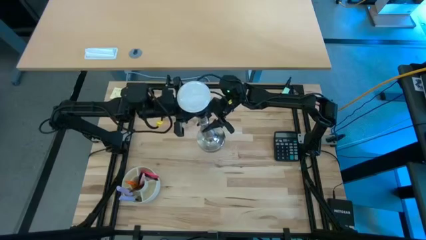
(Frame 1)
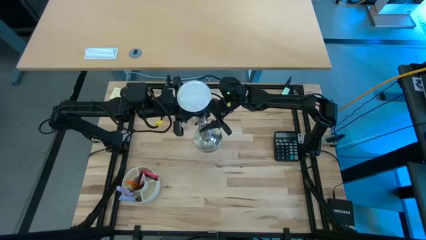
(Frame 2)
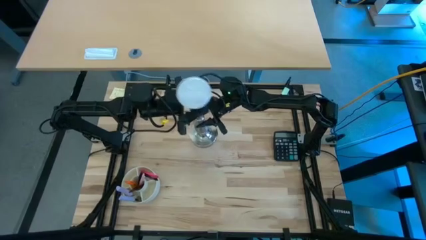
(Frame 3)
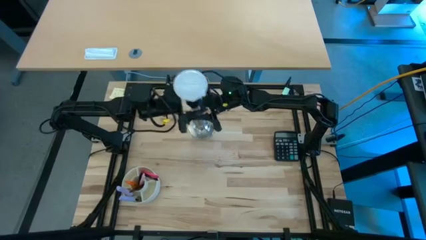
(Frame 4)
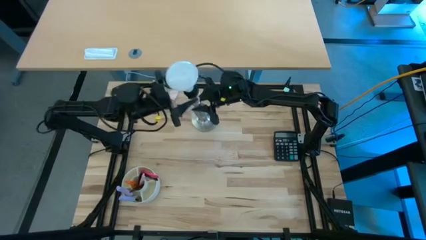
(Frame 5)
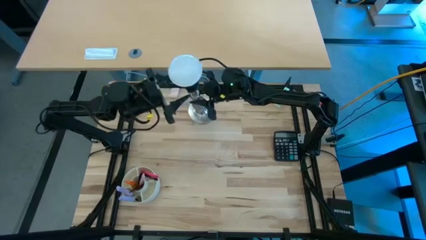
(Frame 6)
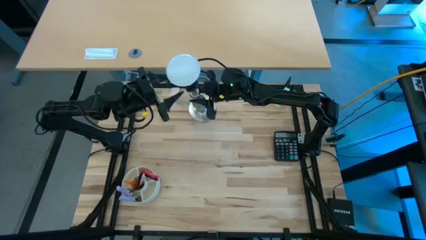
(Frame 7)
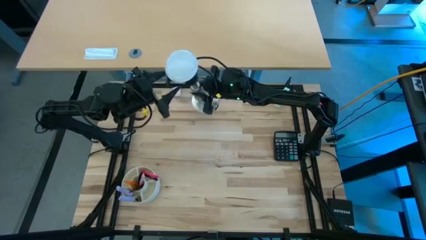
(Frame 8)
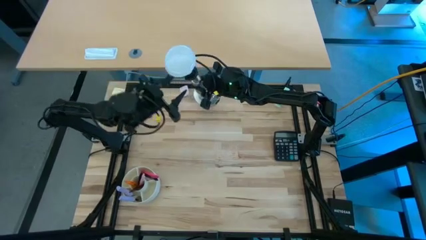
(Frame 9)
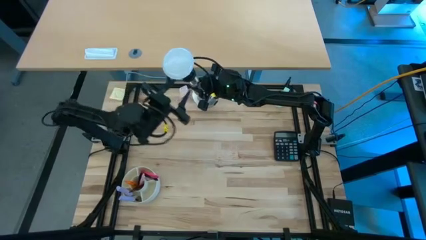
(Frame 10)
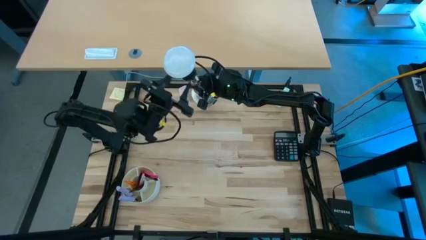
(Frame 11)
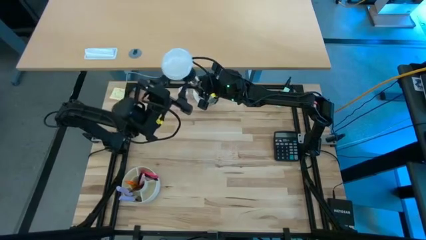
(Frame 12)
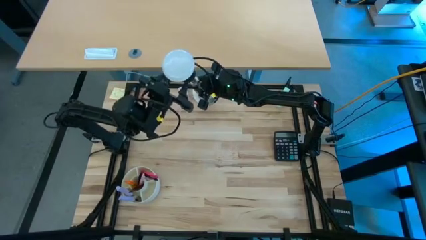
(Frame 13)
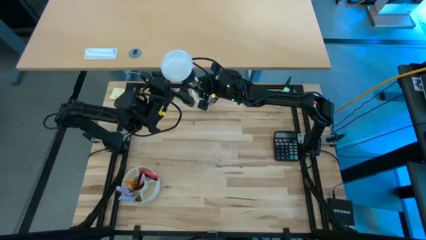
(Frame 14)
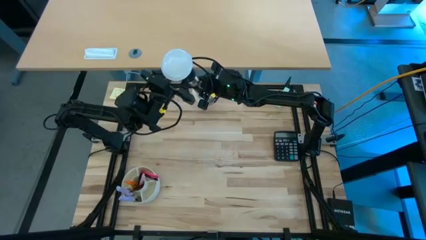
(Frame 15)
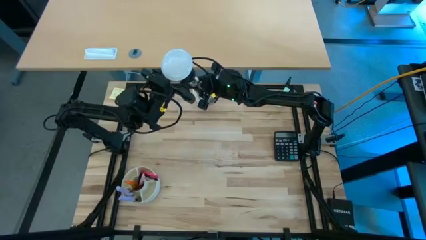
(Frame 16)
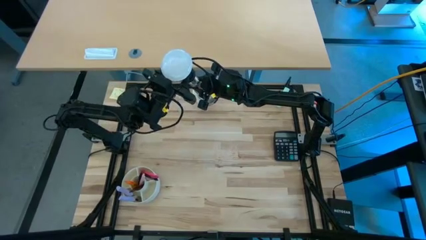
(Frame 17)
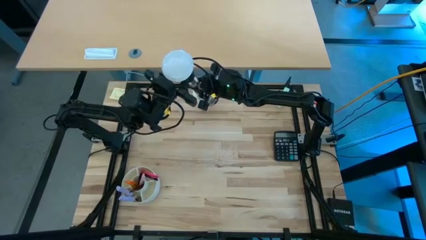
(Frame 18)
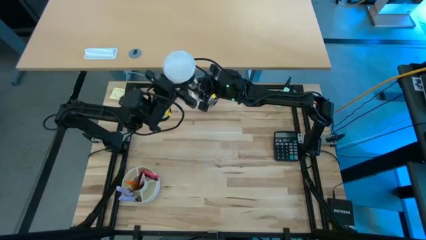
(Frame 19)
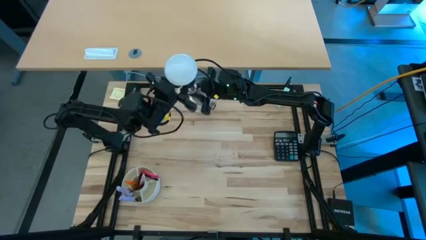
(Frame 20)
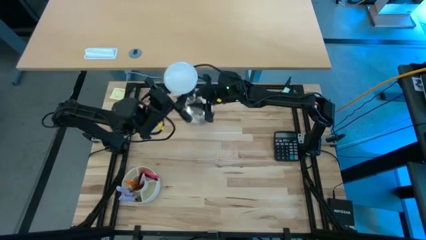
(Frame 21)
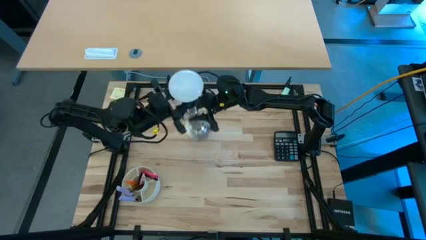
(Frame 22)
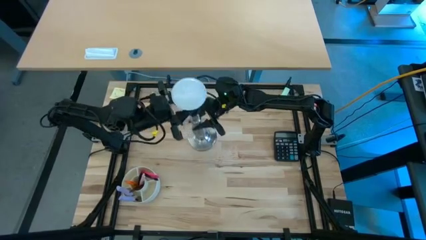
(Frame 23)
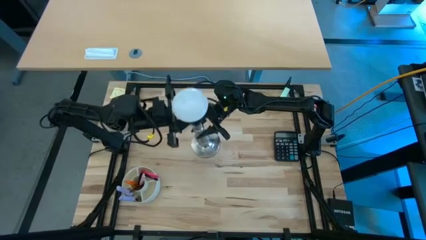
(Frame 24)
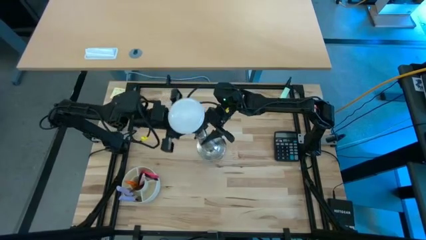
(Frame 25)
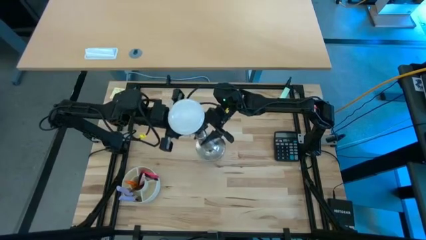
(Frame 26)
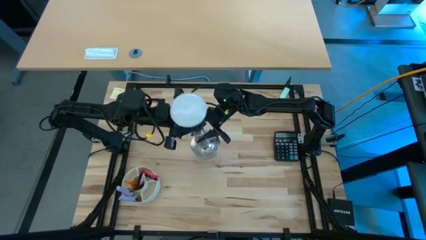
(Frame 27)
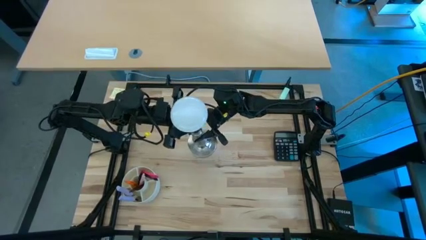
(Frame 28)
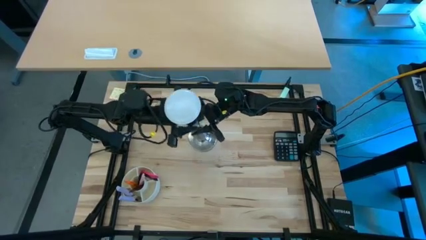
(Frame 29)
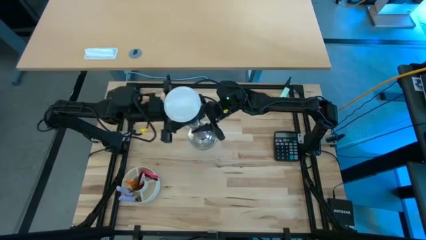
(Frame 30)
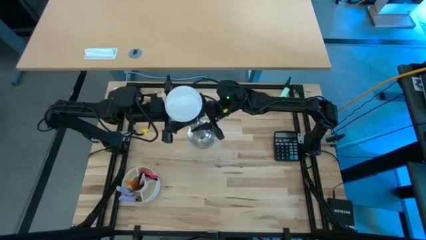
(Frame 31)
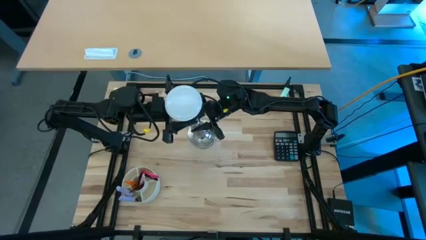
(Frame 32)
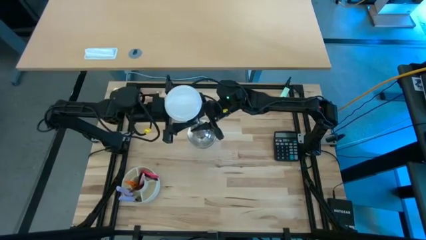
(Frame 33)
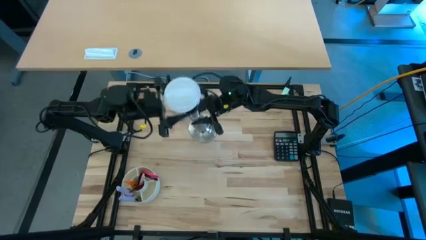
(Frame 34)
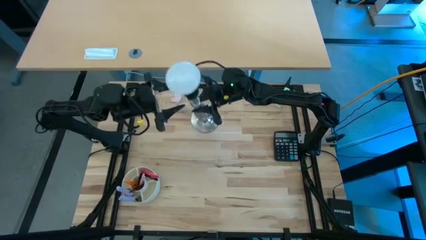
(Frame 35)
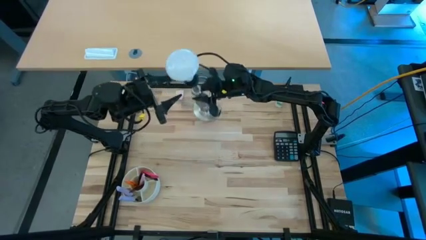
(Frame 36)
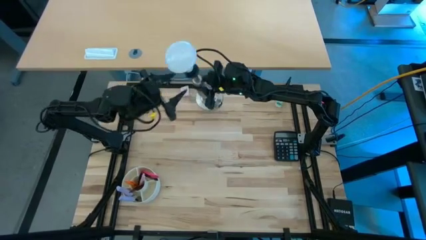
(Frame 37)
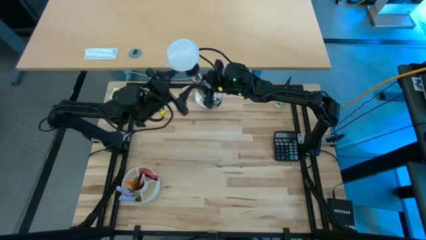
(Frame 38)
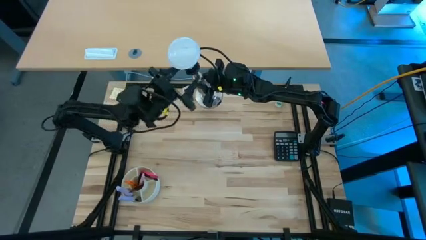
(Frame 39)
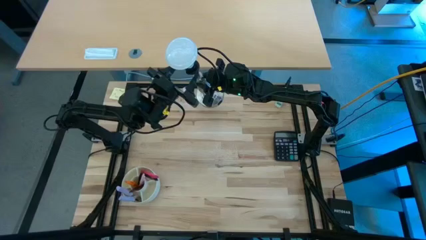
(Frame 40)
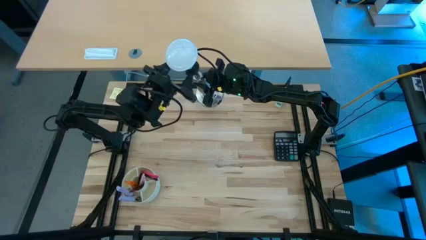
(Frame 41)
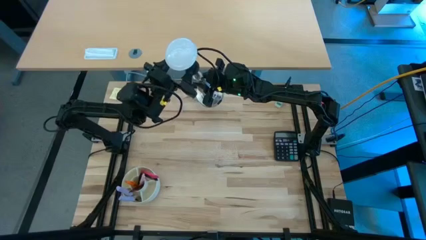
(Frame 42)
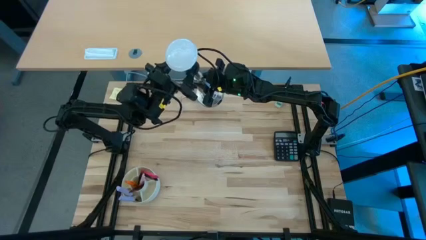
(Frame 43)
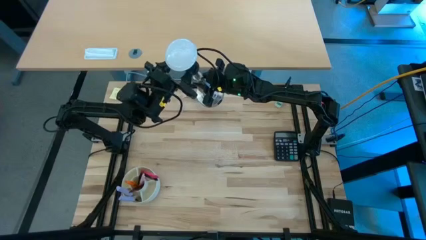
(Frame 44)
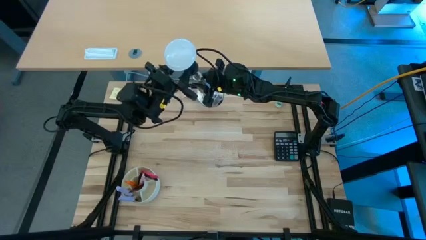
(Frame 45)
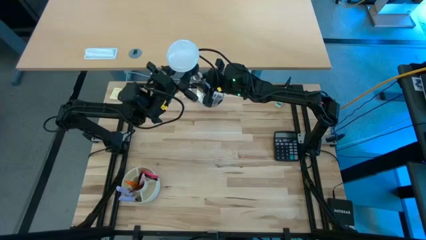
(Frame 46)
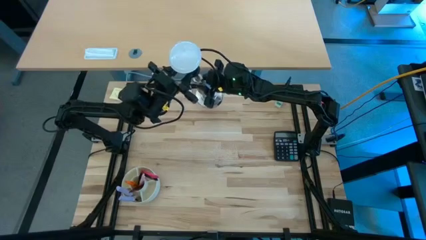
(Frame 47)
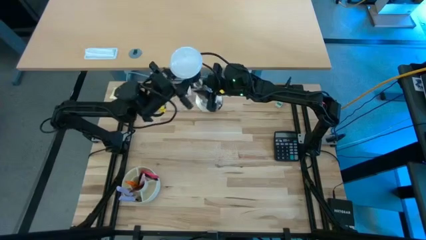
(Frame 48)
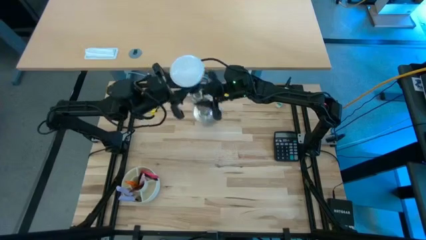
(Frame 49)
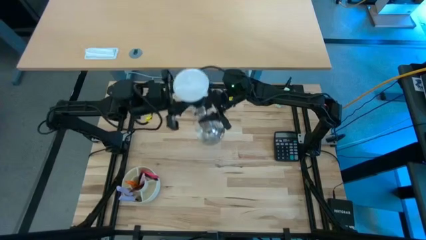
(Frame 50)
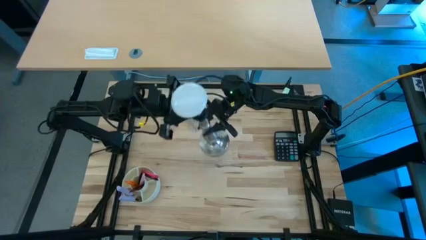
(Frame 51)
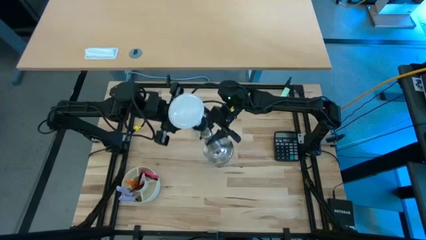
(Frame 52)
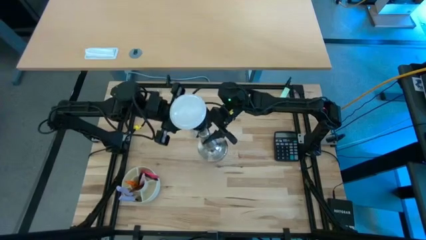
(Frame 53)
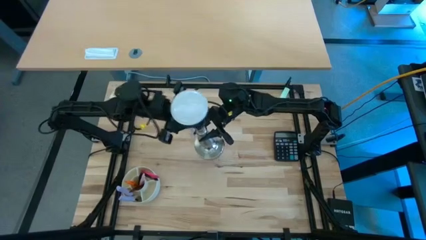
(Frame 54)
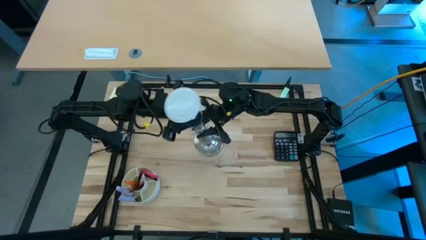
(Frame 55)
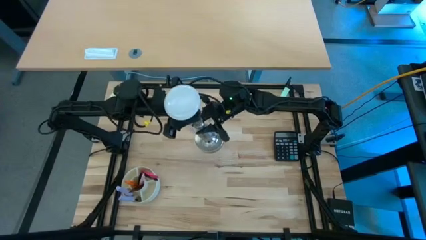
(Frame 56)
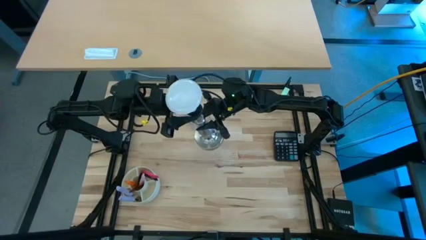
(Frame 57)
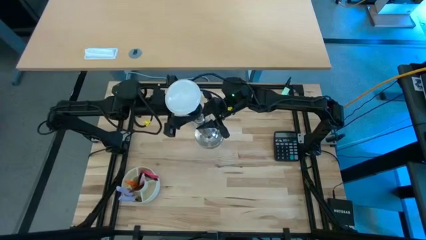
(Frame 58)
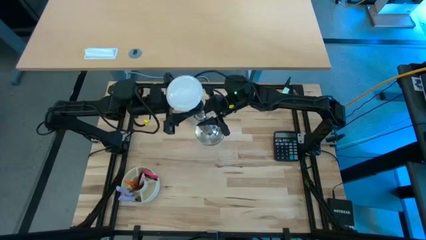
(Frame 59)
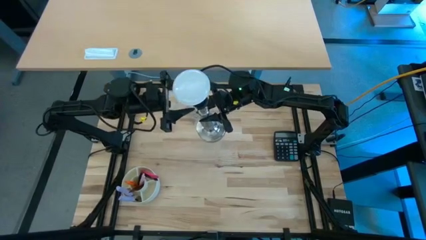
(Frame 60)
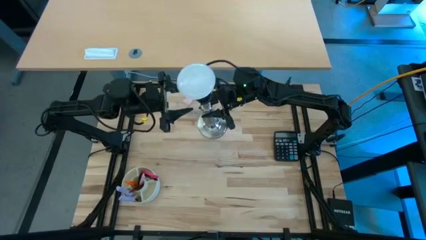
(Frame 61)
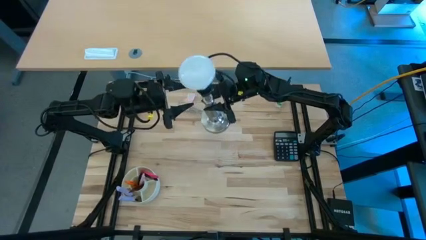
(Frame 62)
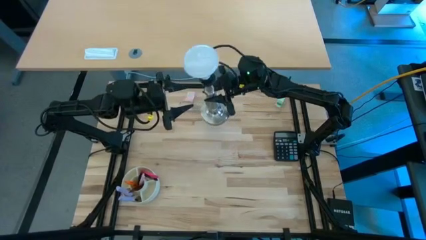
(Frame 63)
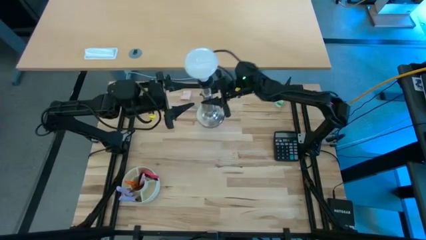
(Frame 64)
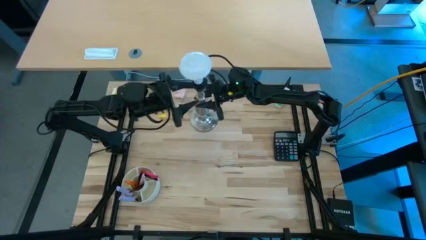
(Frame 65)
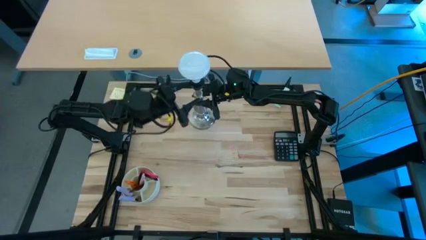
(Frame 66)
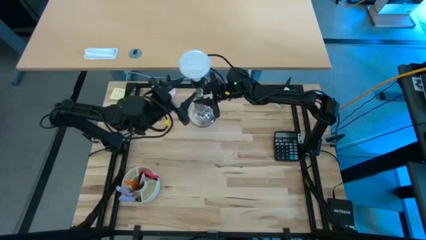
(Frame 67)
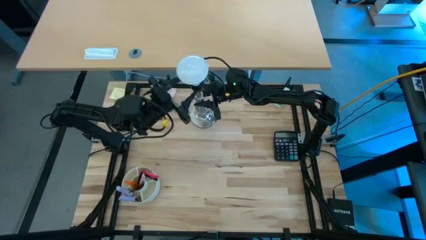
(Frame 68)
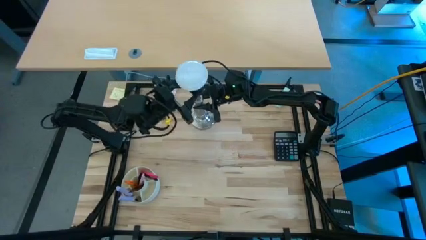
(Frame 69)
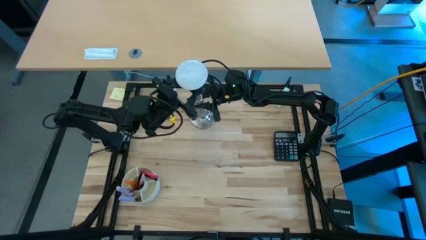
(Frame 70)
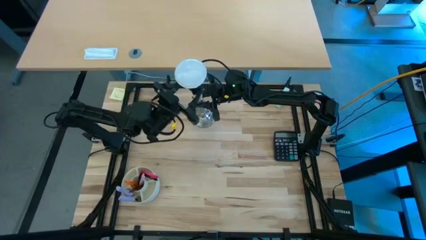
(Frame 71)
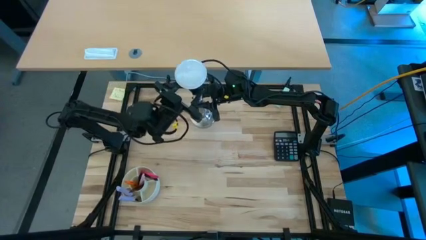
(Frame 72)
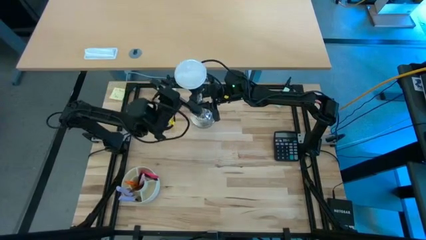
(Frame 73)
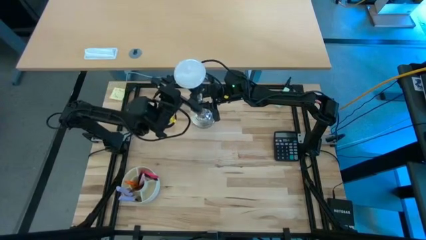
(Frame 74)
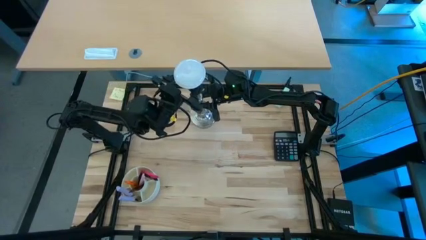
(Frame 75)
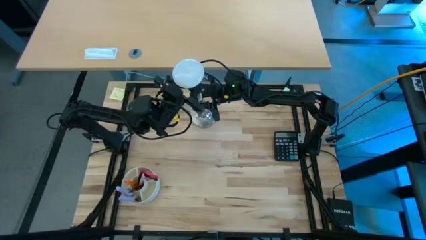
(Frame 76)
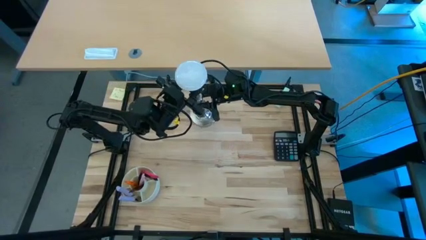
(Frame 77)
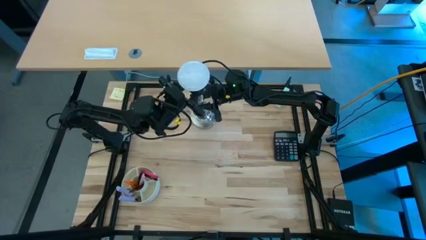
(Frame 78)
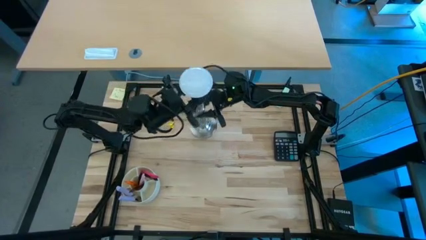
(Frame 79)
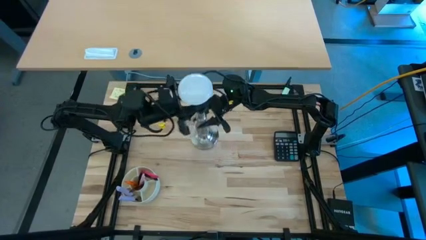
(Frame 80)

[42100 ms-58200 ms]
Task: Screw lightbulb
Insert the white lightbulb on the silver lamp
